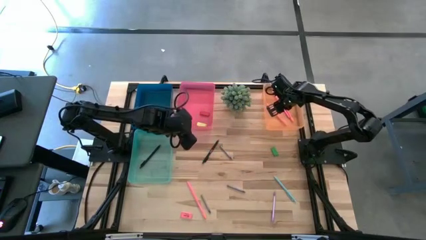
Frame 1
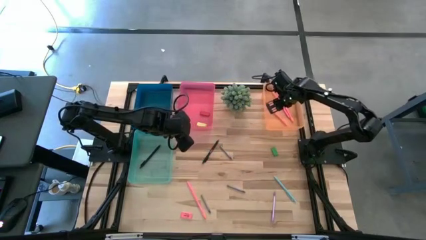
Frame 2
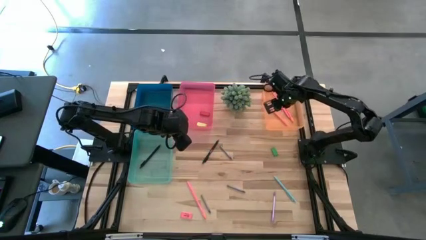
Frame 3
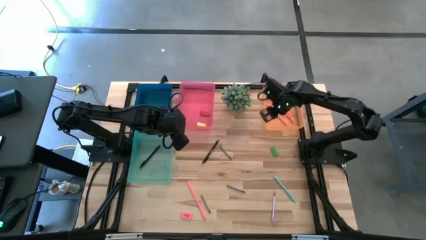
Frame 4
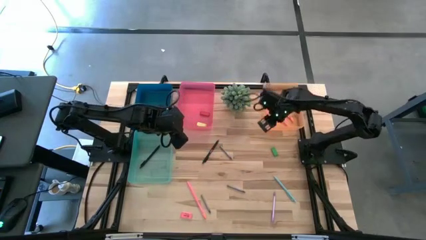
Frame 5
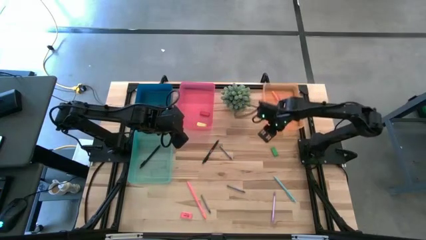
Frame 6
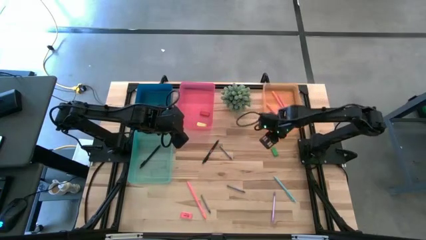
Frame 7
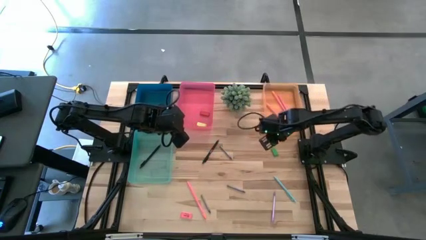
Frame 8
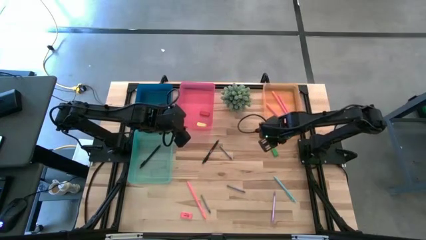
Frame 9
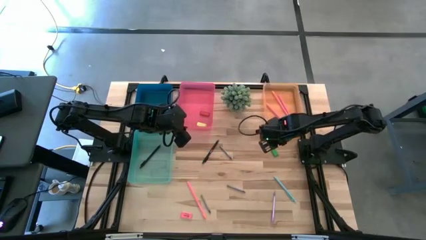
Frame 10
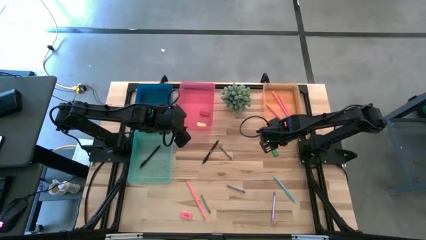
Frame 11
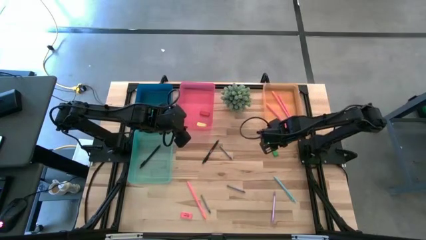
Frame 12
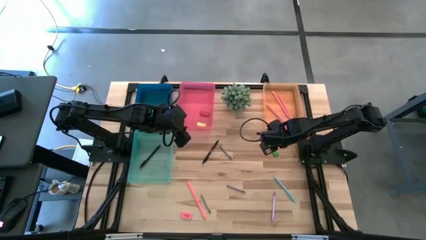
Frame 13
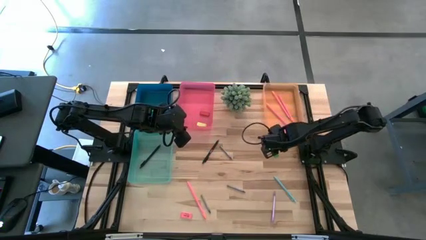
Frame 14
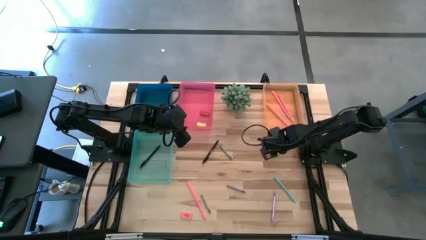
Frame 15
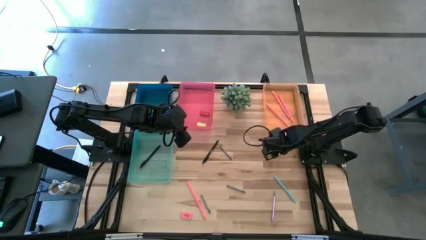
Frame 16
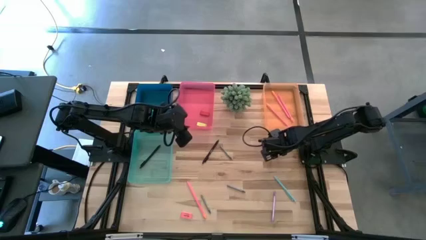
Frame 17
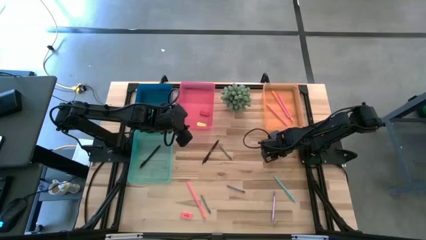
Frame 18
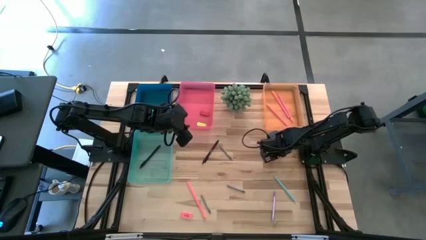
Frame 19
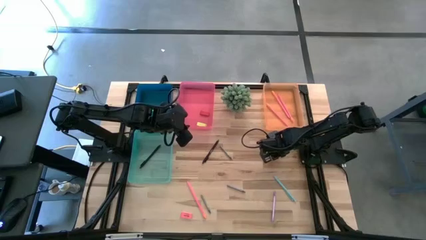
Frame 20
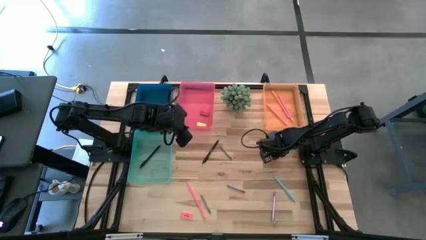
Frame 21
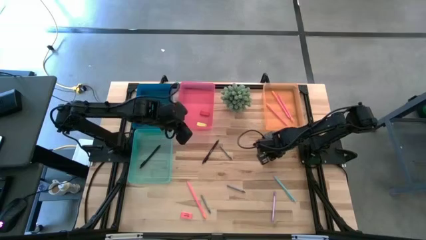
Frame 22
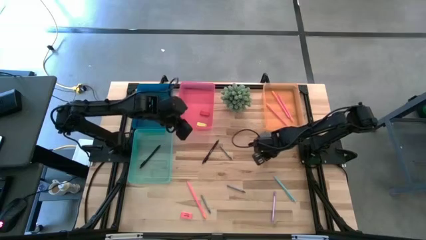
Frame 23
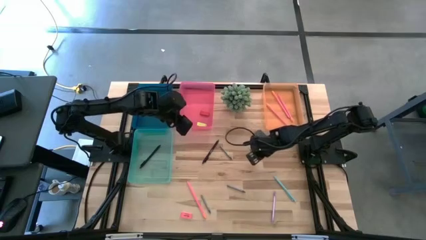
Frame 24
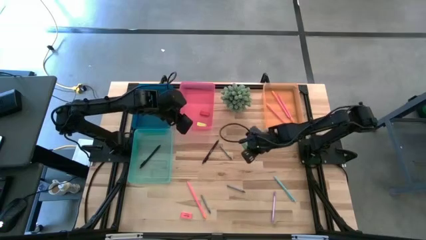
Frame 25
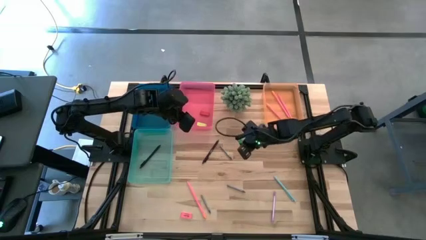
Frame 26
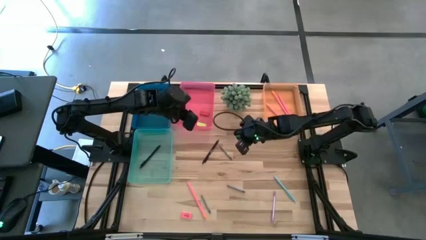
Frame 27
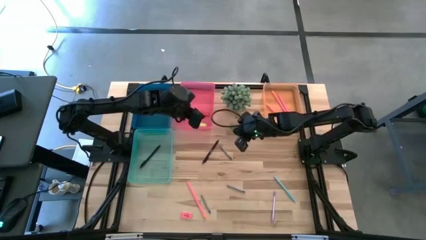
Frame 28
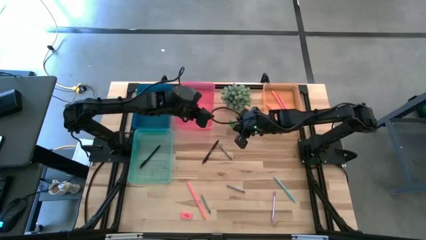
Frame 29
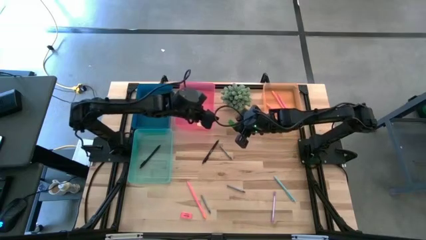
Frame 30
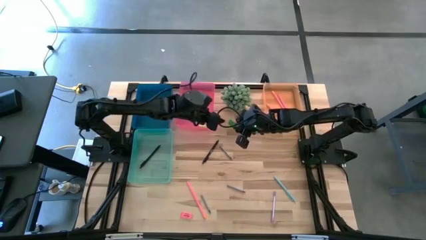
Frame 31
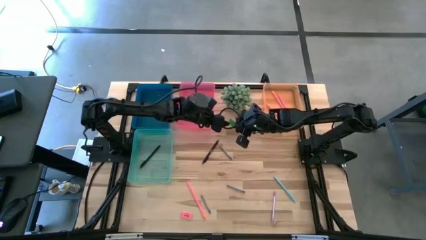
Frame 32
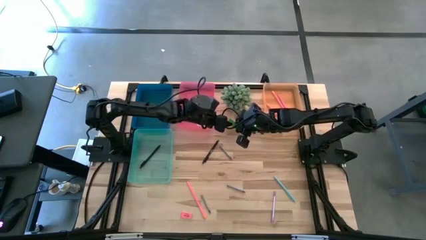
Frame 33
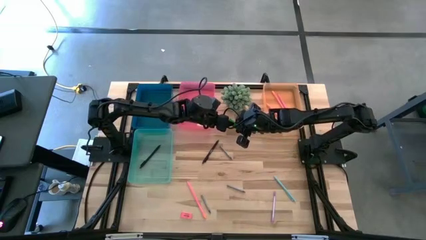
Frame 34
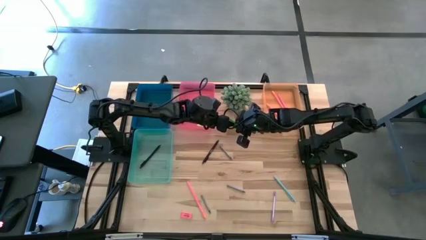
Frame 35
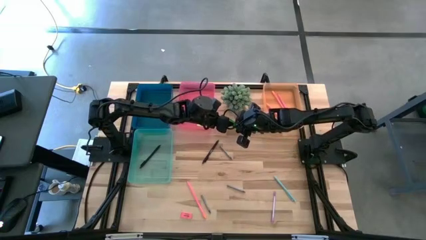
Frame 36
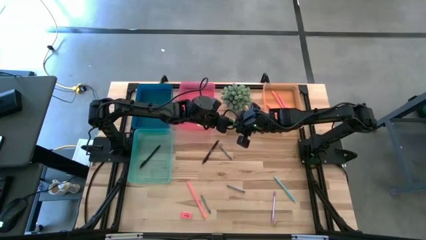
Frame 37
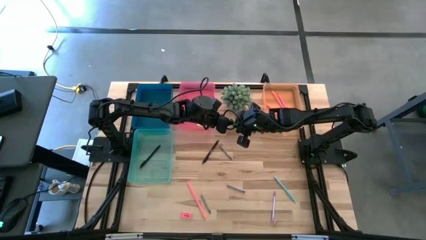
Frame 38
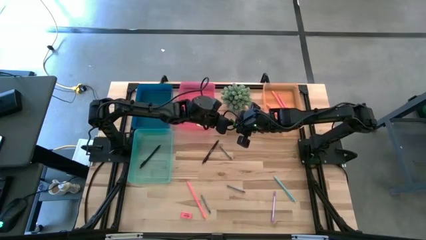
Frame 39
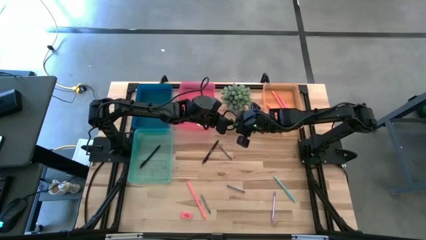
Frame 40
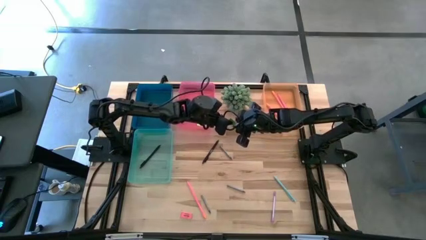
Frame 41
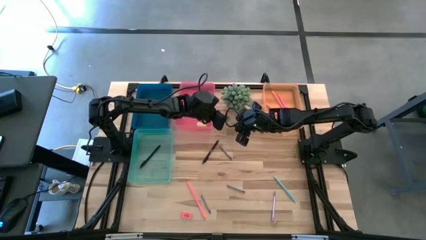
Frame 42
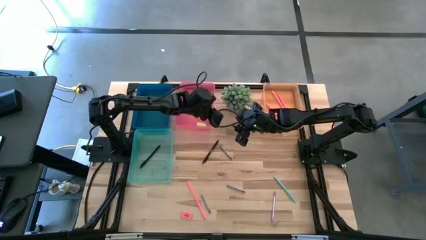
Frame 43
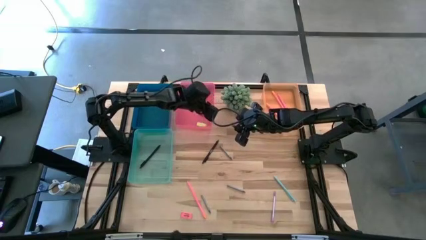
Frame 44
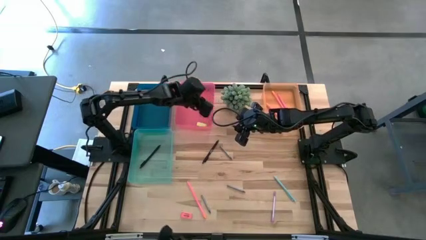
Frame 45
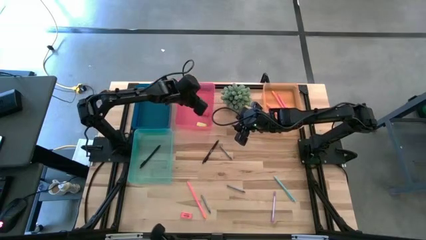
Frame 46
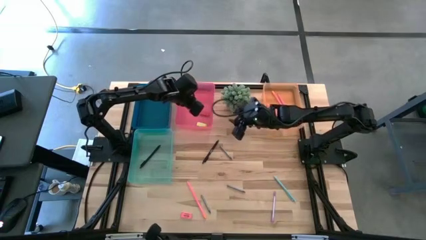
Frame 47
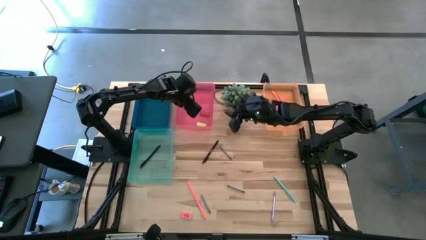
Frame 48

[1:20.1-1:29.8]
Task: Sort crayons/erasers/pens/pencils in bins
Put the green eraser into the pink bin

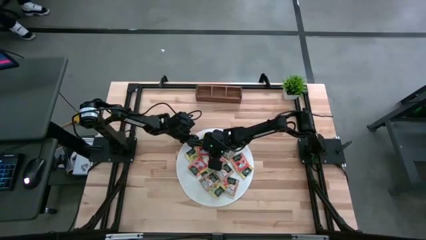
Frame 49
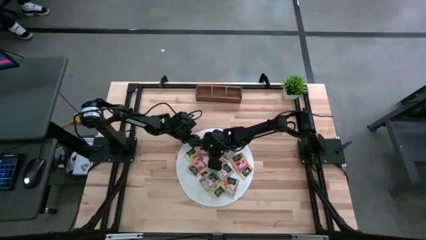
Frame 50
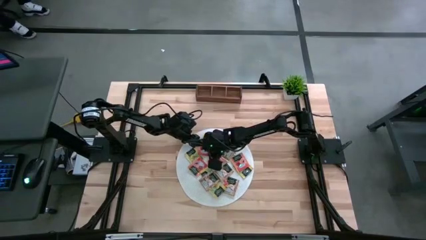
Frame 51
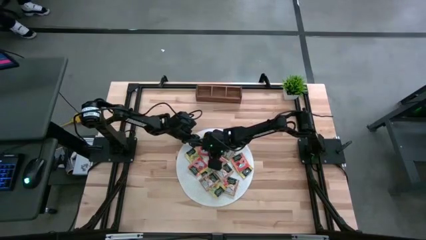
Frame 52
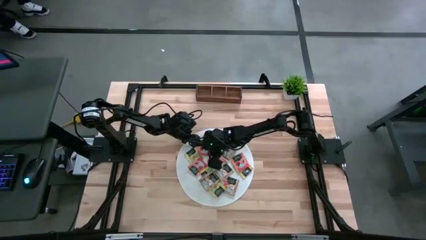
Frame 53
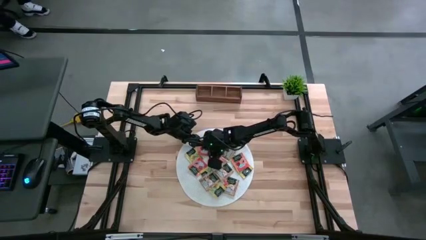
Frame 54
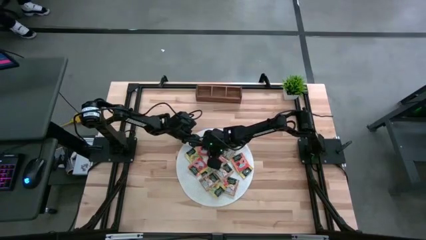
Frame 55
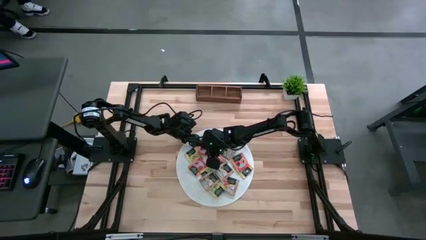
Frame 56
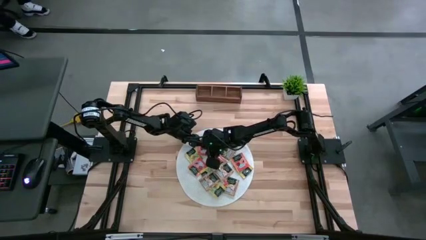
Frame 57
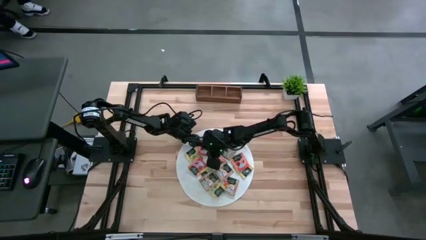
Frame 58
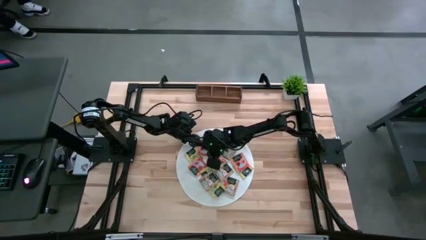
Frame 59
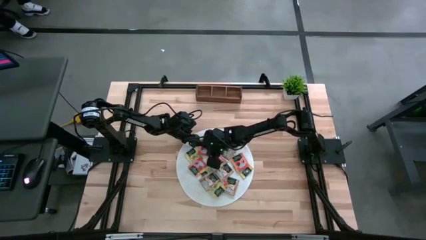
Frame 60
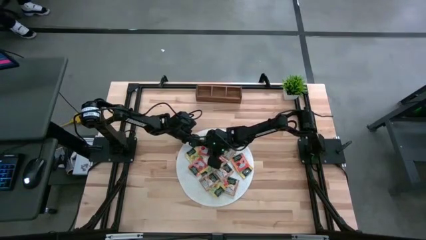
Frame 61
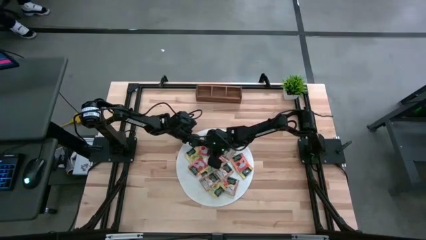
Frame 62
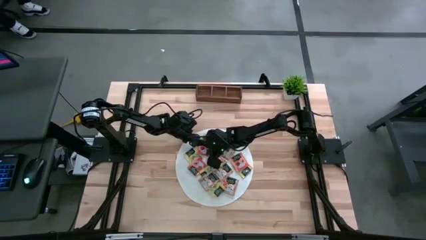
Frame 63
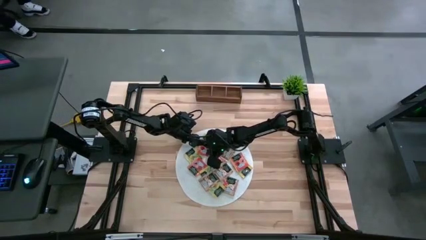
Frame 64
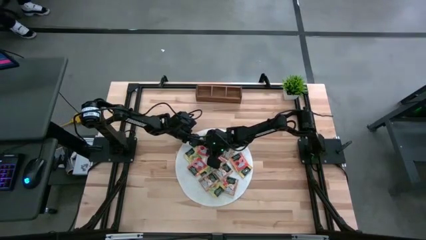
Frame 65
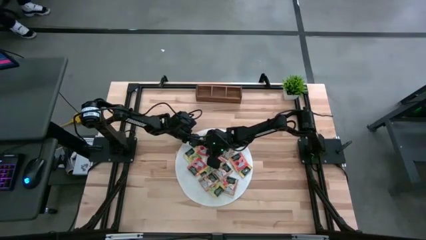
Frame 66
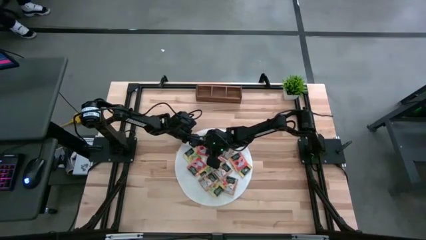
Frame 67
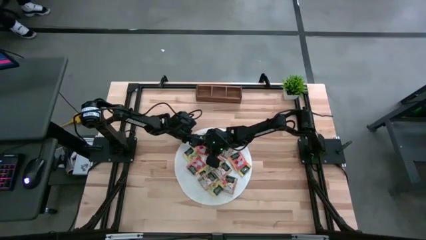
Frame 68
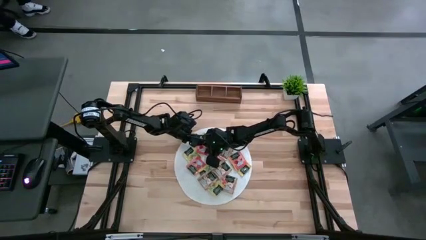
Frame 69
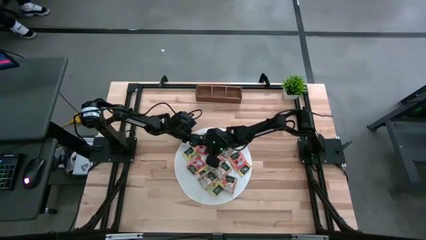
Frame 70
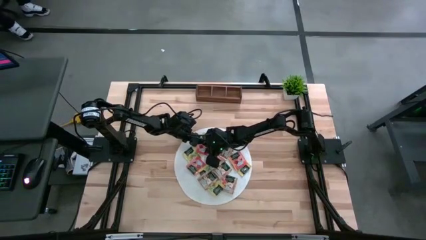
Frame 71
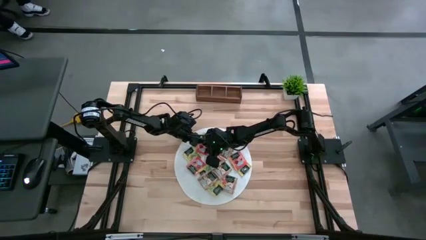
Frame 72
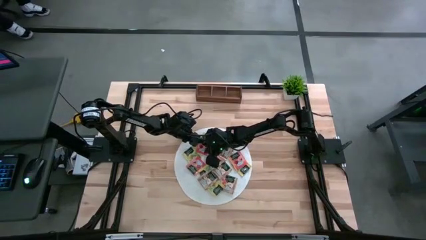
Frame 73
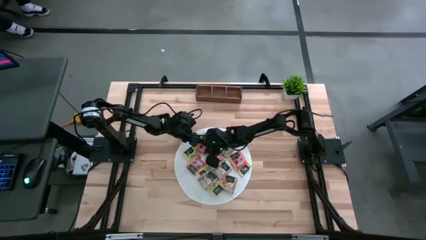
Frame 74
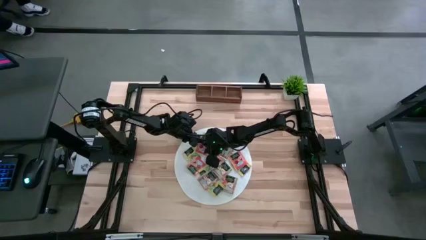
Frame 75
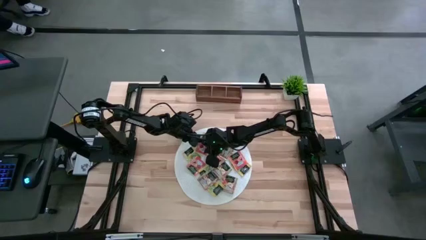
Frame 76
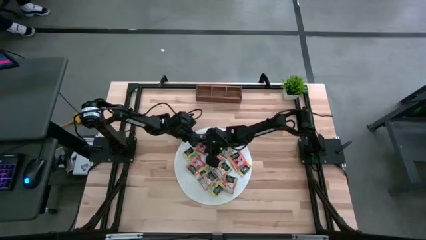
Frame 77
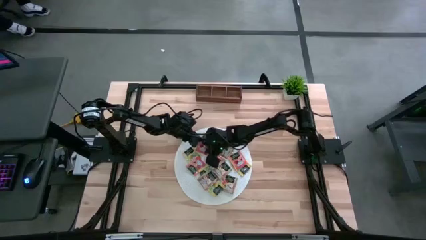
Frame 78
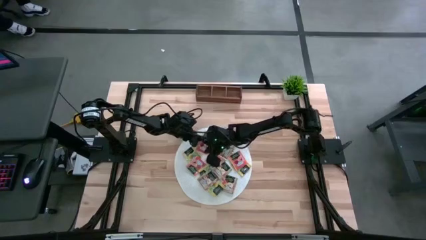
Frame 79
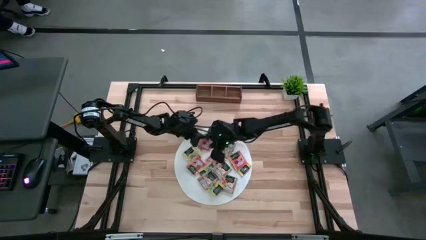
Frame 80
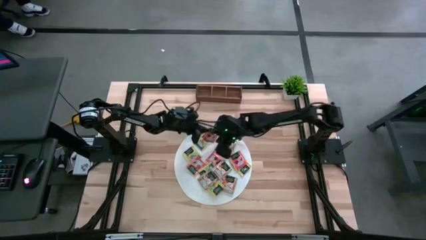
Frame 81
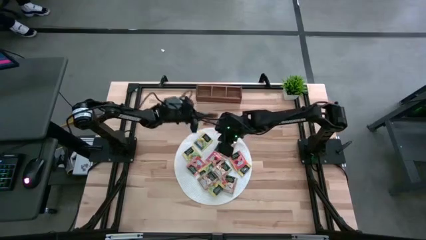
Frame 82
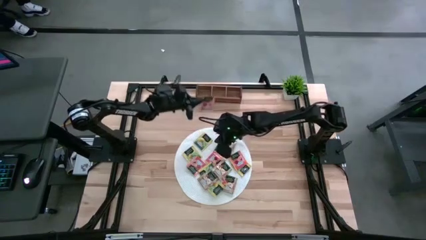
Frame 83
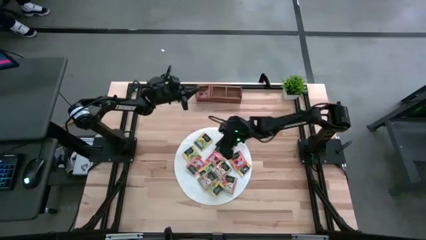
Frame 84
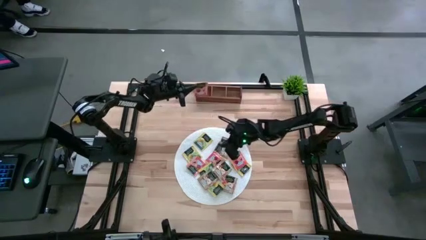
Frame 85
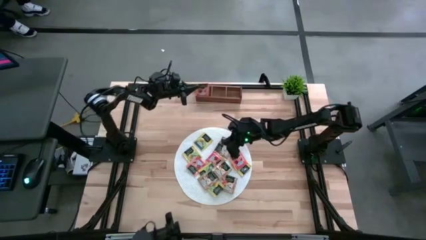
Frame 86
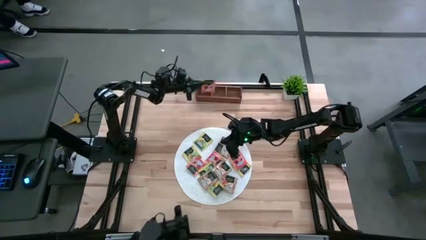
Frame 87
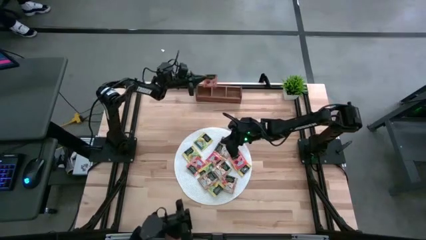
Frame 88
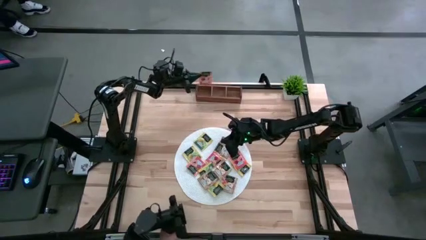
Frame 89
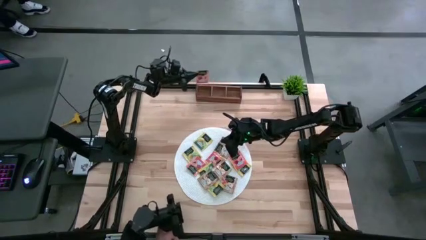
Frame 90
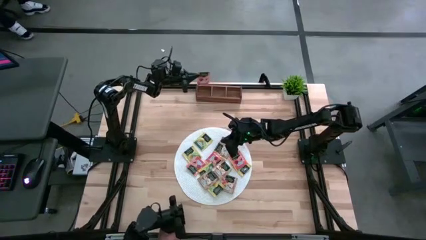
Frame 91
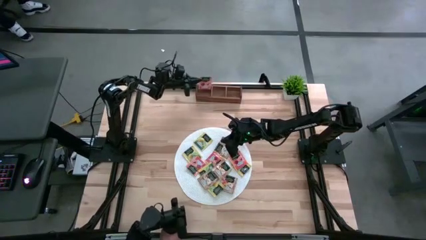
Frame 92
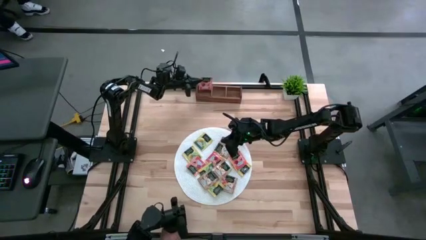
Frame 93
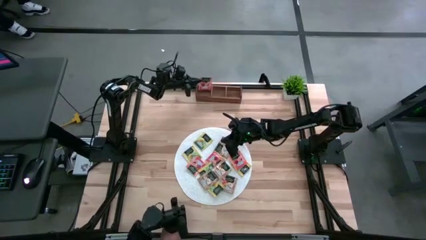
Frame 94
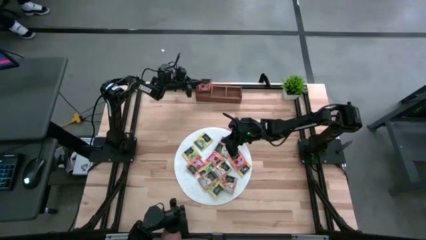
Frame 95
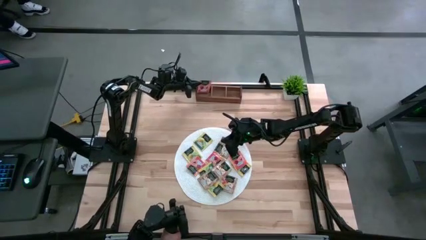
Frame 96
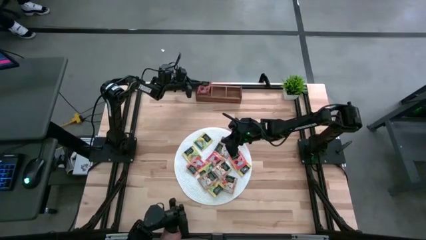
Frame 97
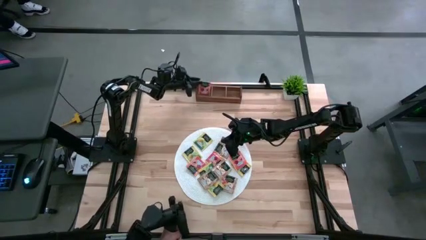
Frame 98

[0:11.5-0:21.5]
Task: Pick & Place Tea
Put the orange tea bag into the left section of the wooden organizer
